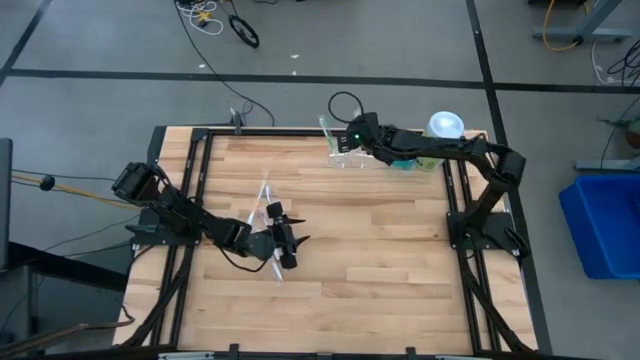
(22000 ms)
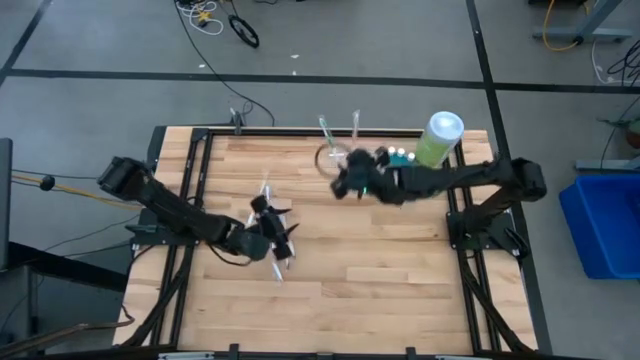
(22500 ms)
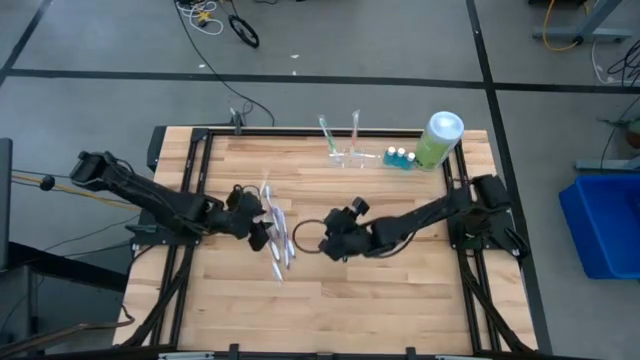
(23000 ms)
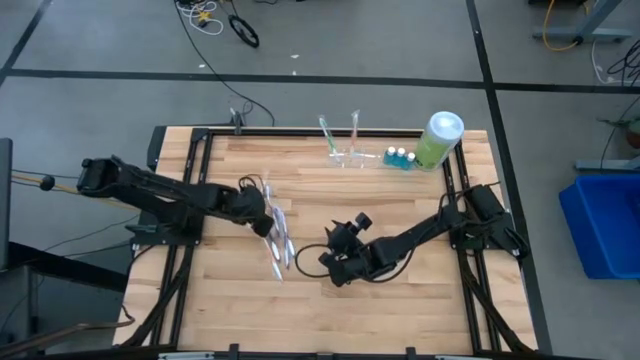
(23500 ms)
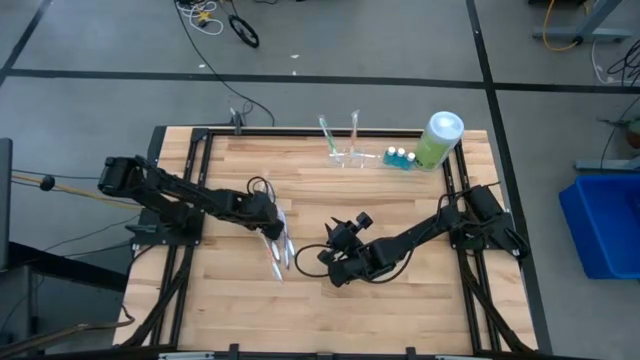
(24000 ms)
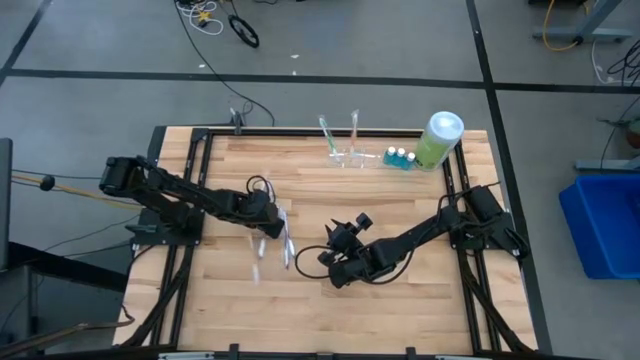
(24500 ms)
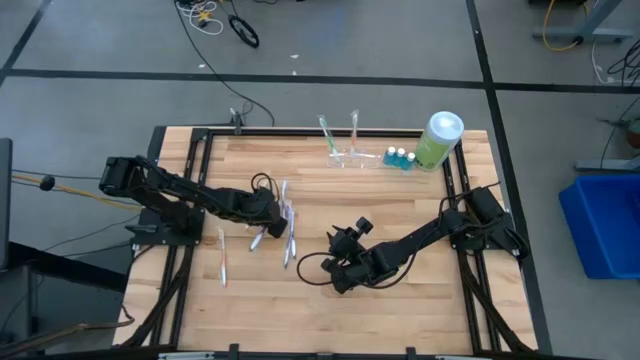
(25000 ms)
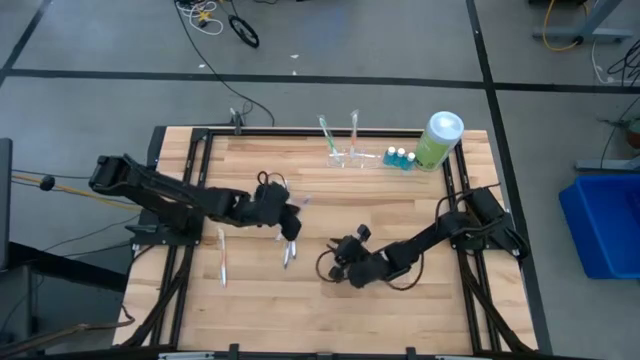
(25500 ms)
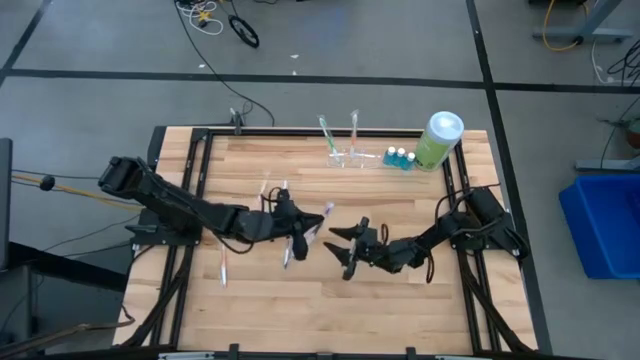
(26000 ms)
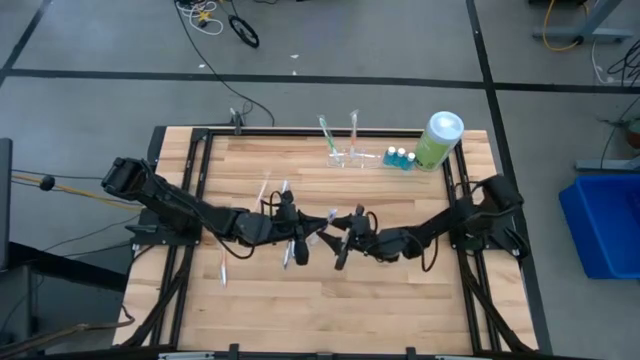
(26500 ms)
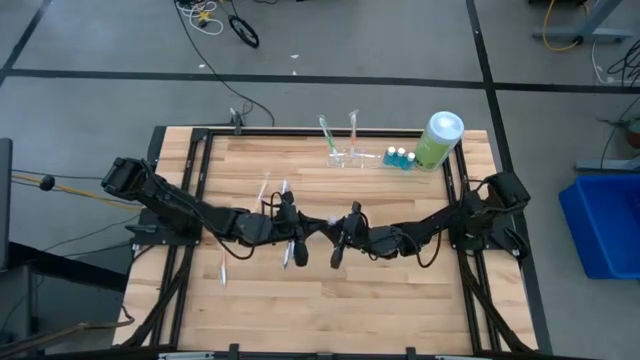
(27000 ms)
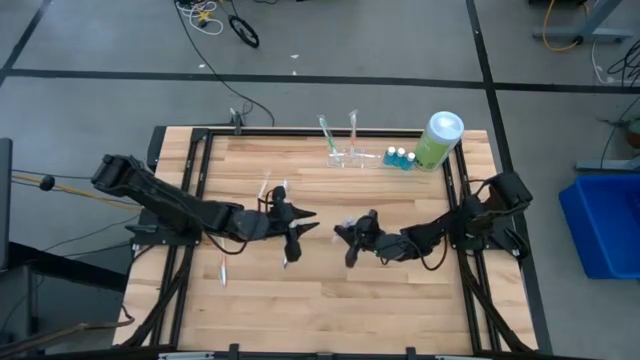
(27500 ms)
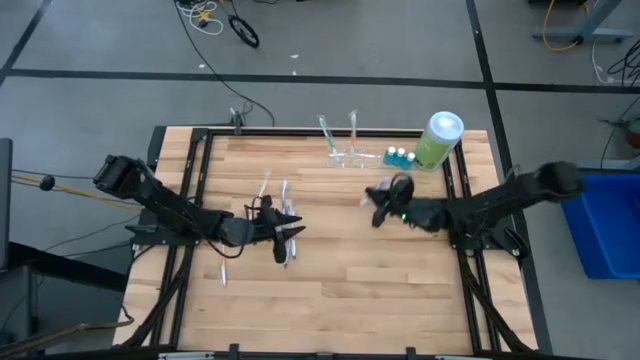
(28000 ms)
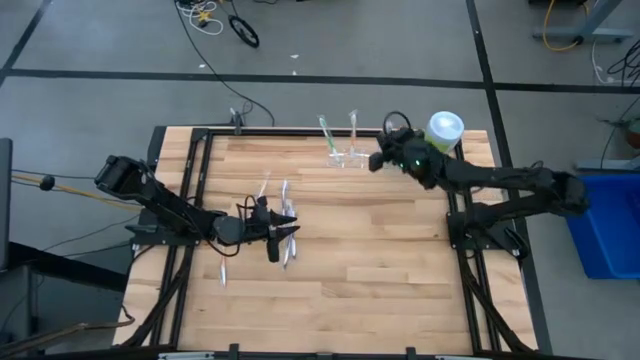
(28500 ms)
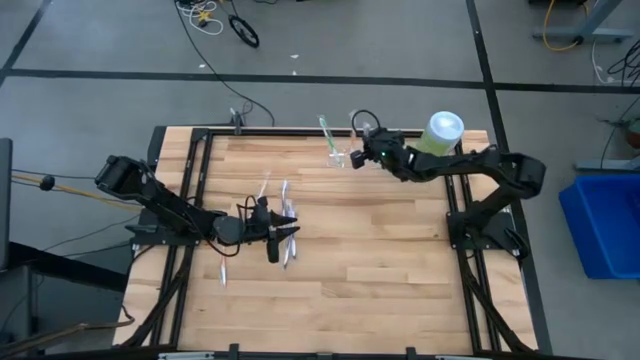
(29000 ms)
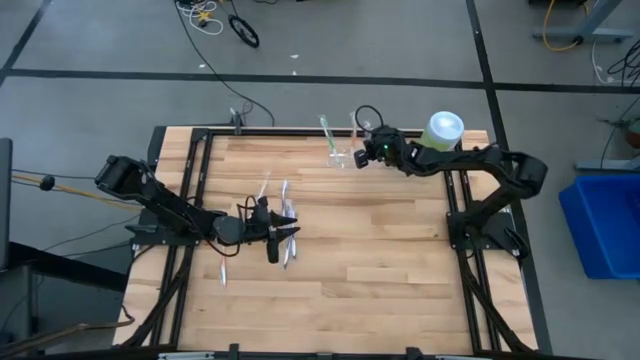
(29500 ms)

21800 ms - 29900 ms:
Task: Pick & Place toothbrushing station
Put the purple toothbrush into the right section of the transparent organizer

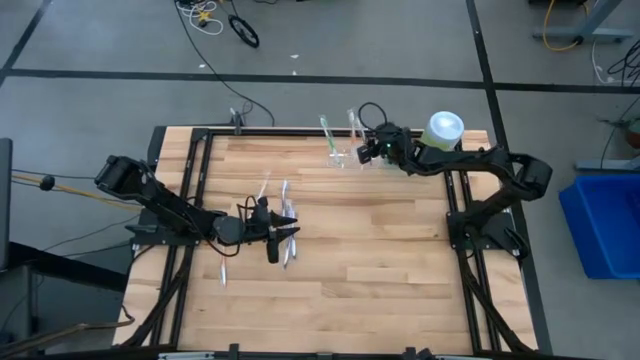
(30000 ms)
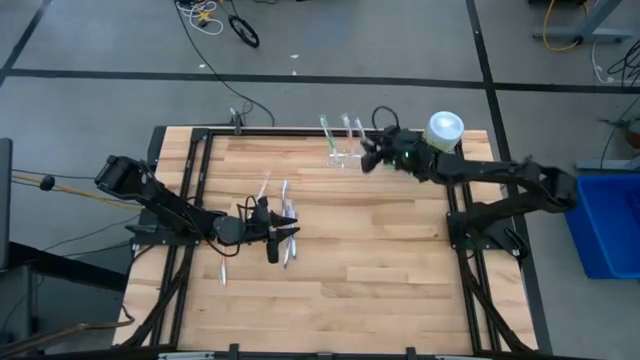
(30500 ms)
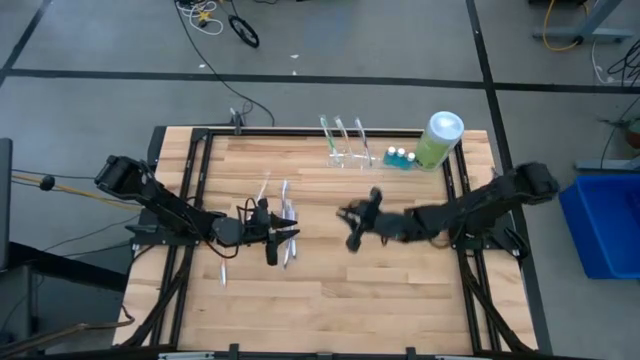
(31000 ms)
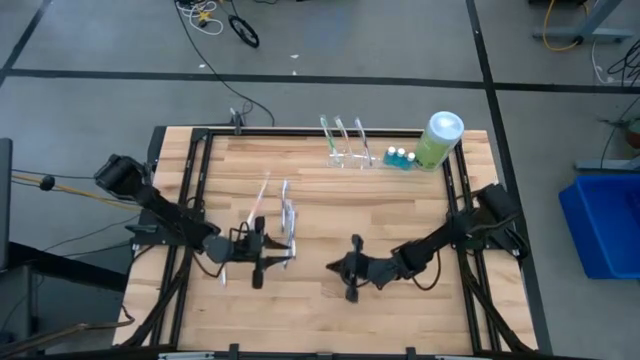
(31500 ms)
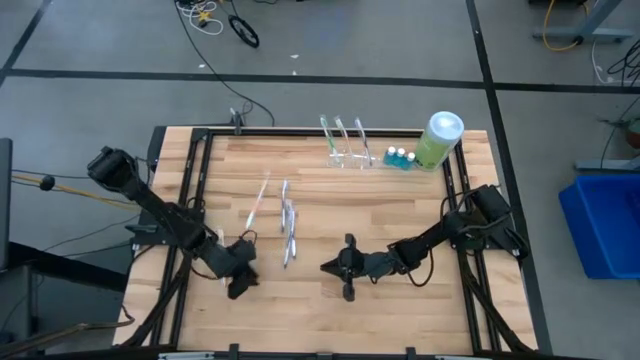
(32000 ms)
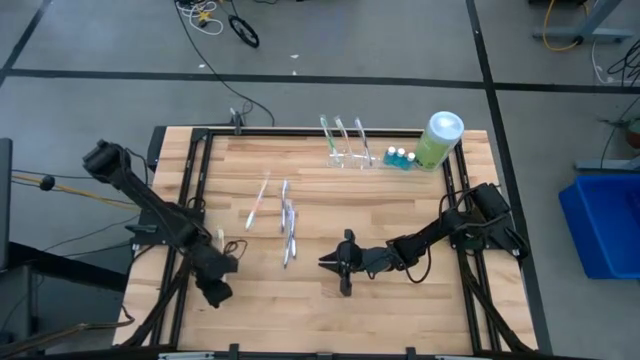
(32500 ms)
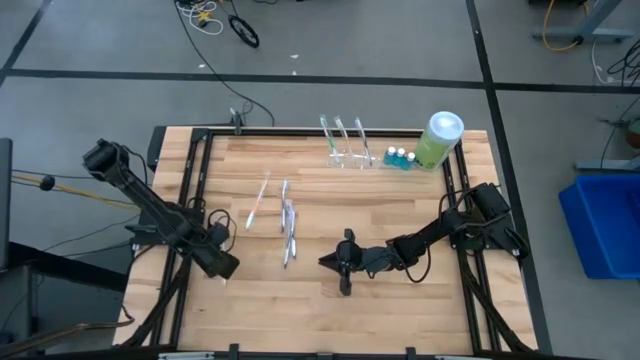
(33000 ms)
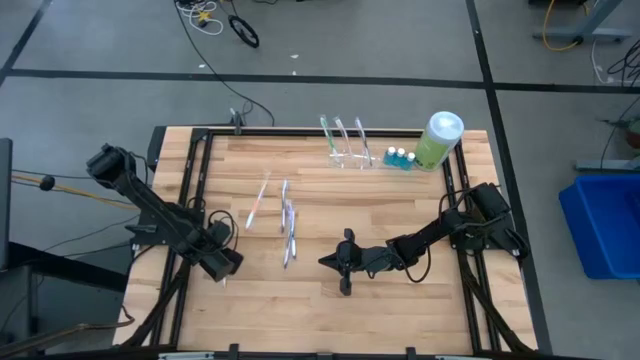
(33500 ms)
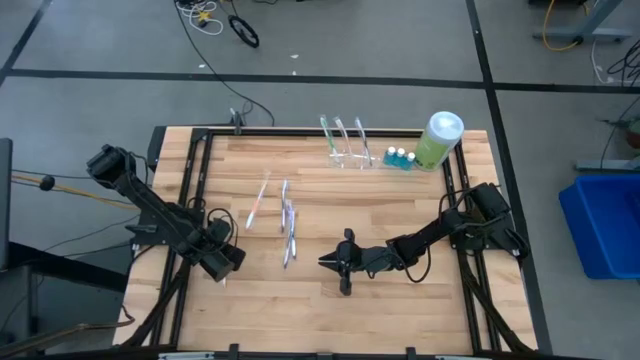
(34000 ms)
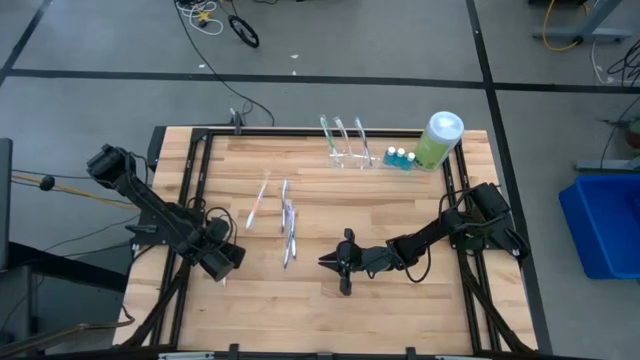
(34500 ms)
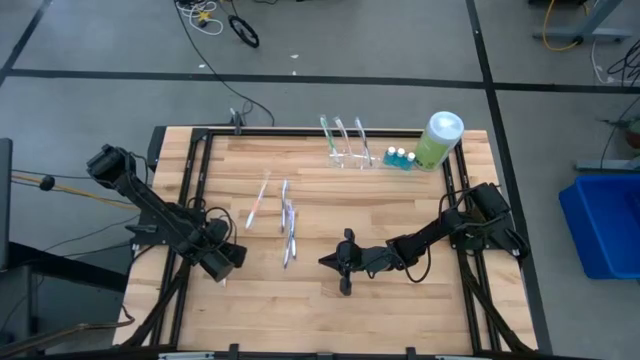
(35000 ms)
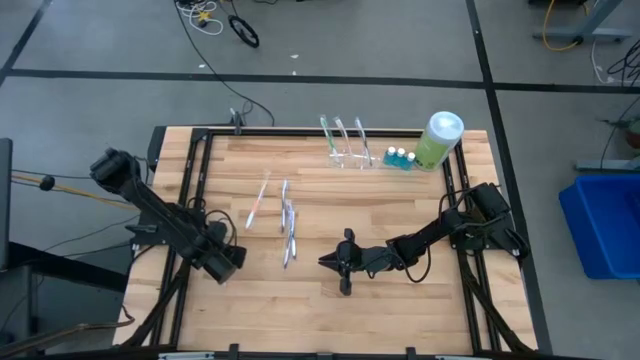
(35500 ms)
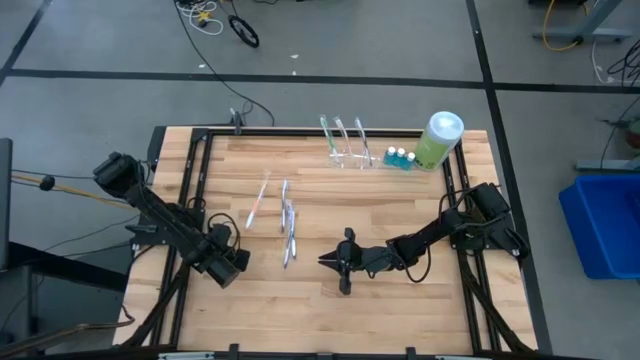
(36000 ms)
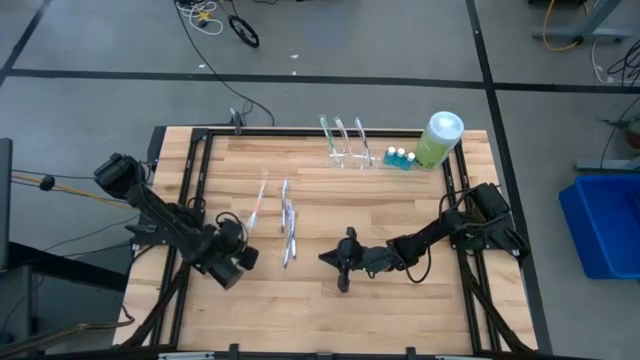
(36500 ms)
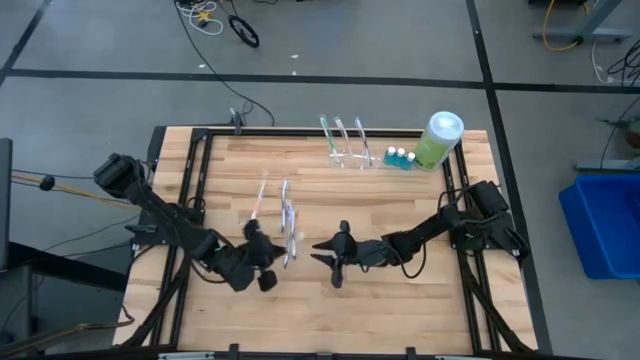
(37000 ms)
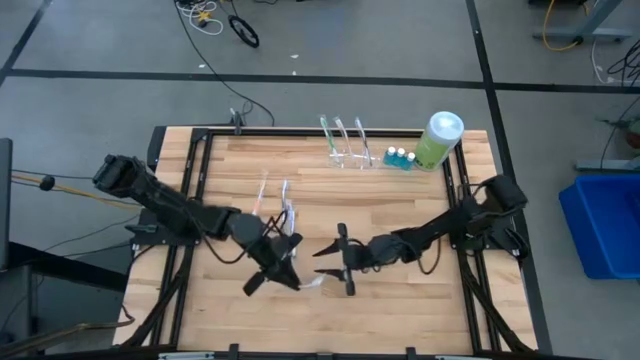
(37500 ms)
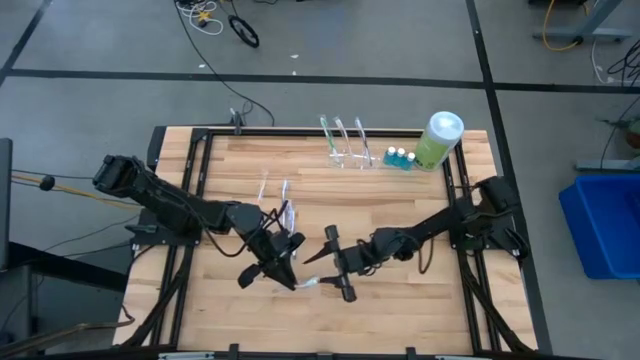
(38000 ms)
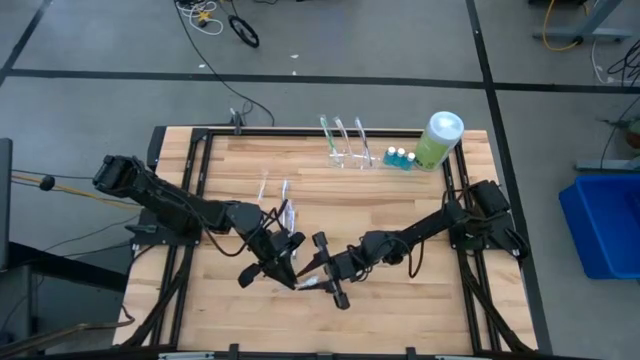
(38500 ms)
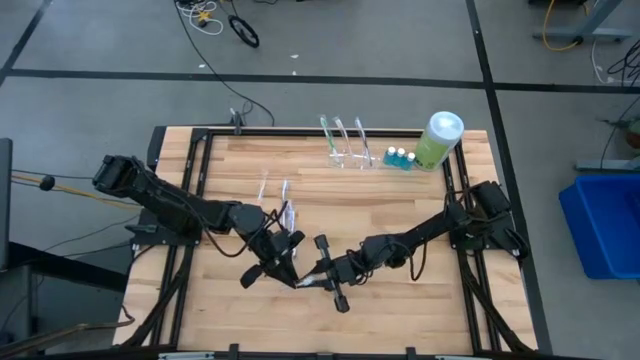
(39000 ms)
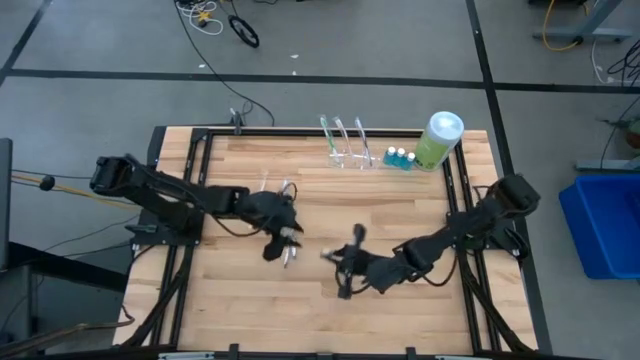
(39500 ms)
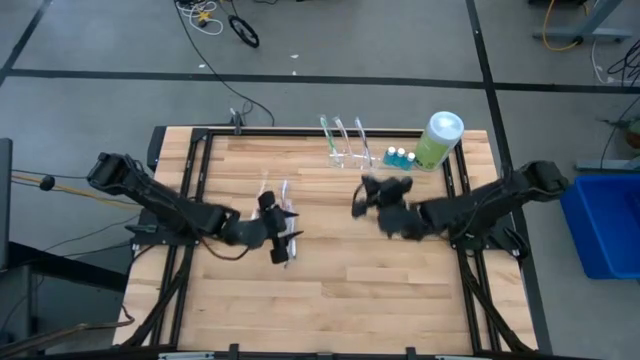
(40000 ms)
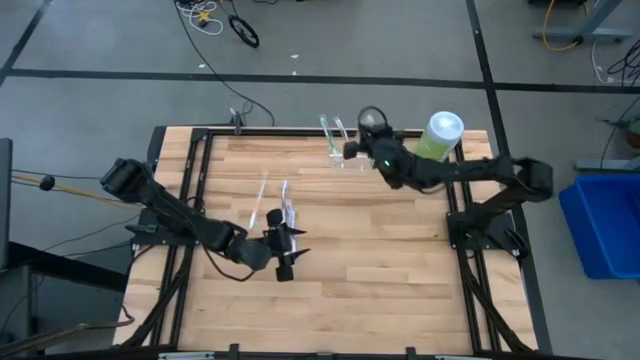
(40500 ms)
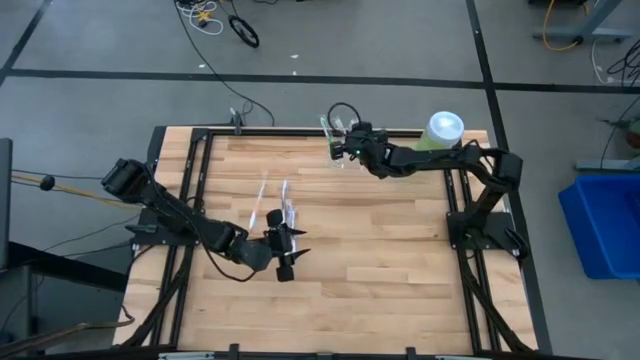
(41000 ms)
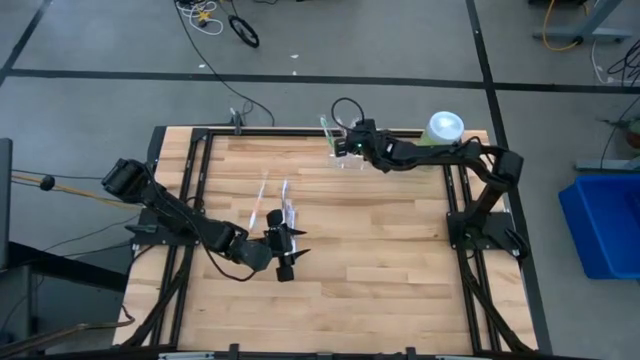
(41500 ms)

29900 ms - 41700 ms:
Put the bottom orange toothbrush into the middle section of the transparent organizer

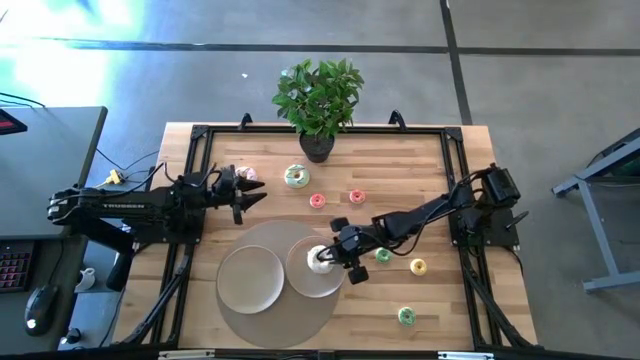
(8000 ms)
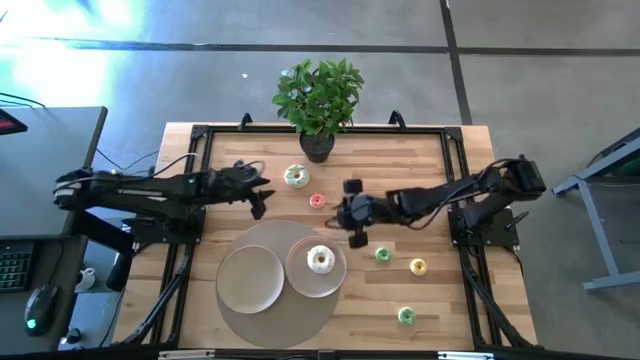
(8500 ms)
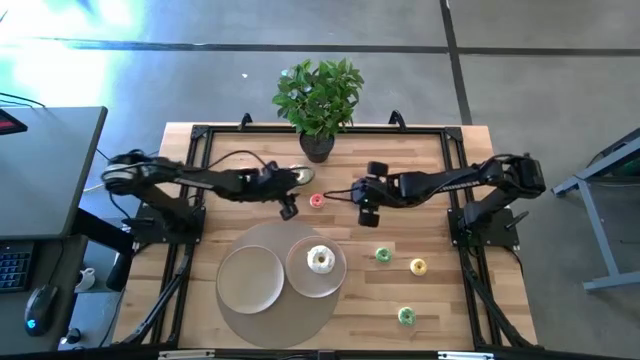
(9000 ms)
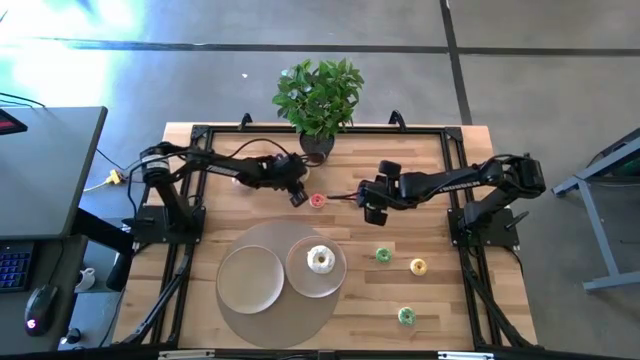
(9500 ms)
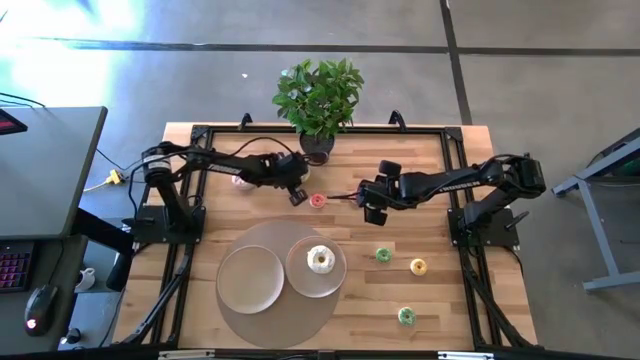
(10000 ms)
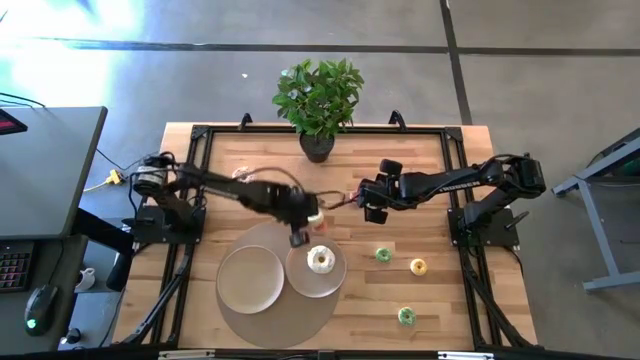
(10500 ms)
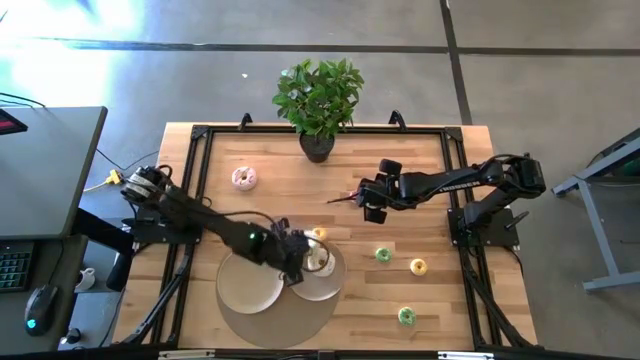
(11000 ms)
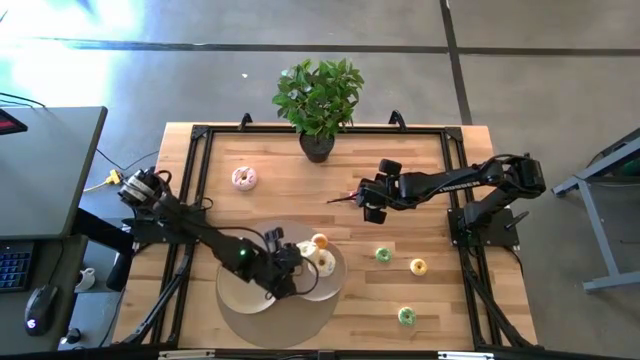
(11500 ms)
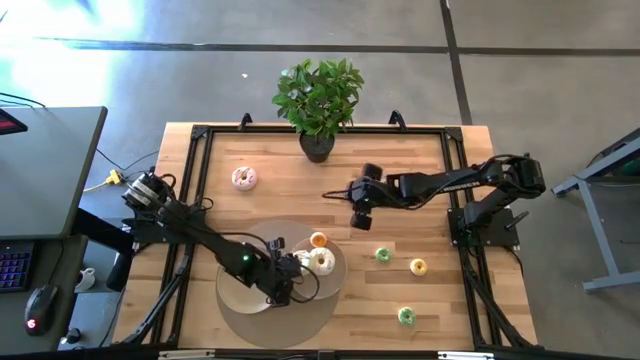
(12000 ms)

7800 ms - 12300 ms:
Task: Pick & Place donuts
Put the large blue donut on the right white plate
